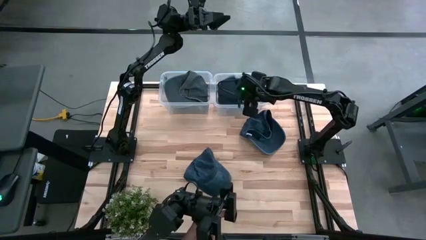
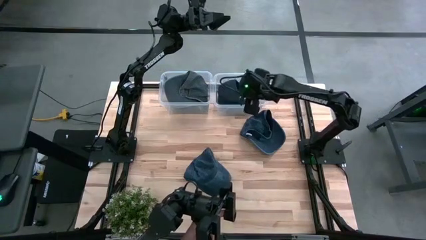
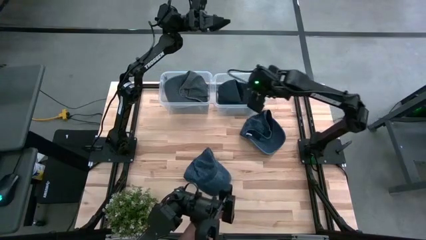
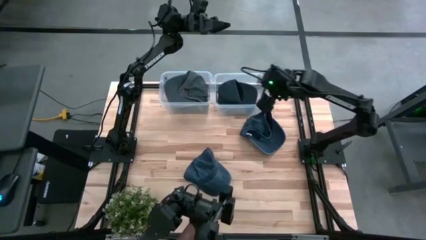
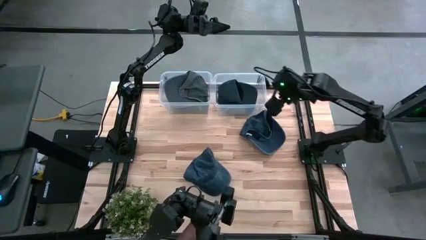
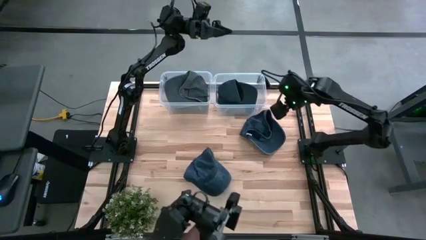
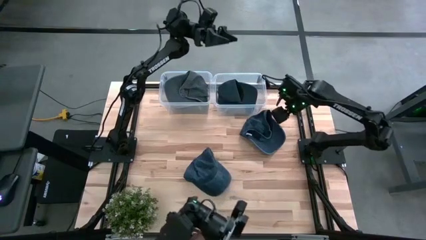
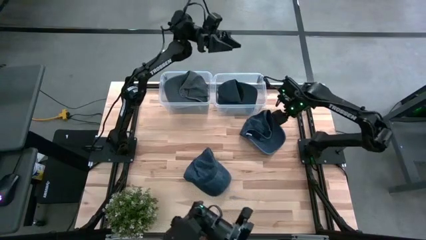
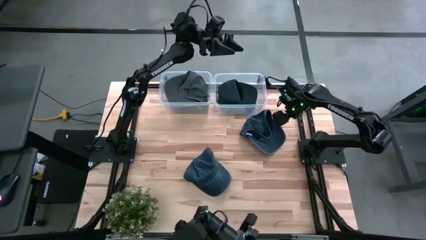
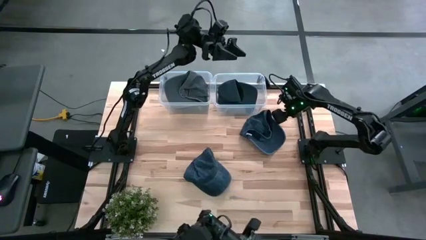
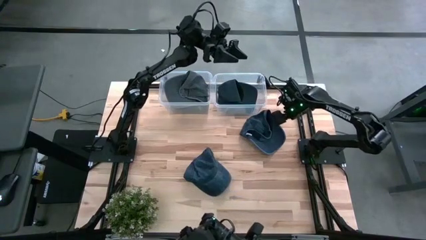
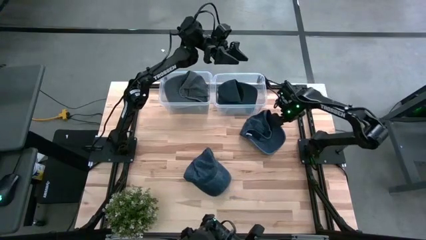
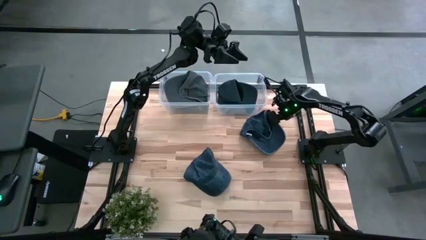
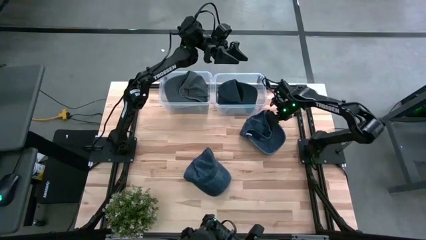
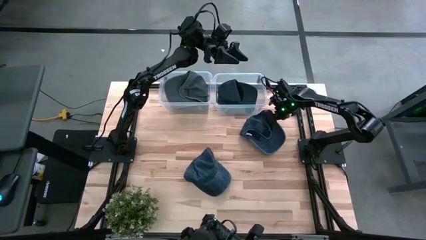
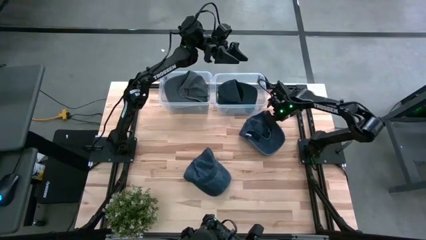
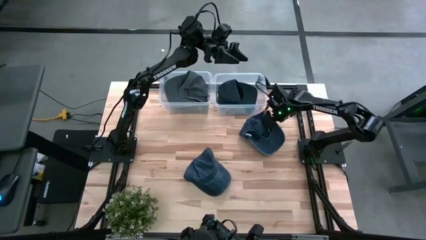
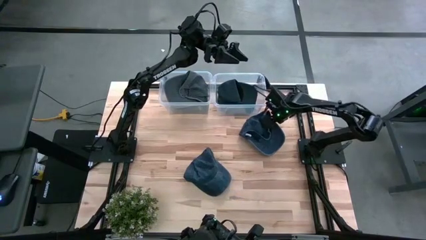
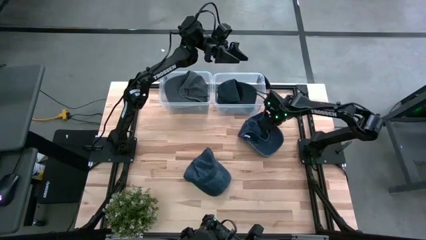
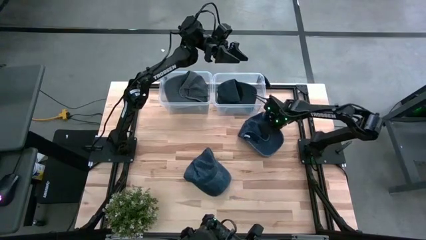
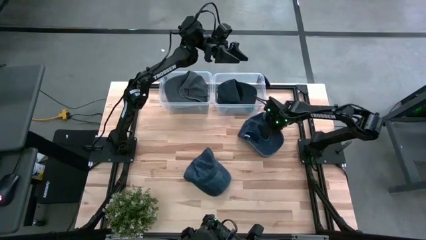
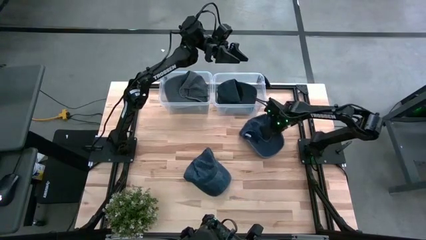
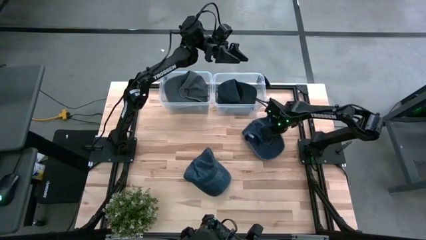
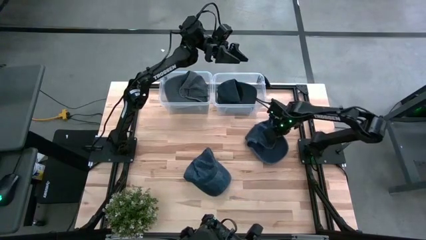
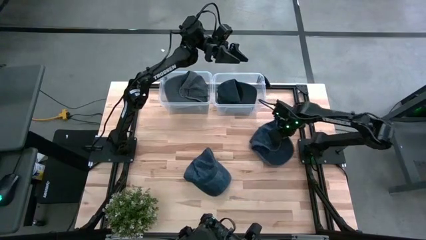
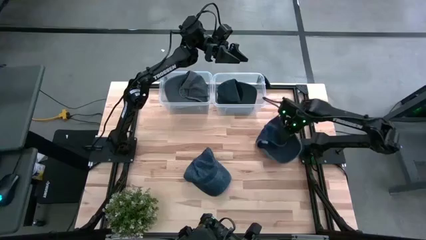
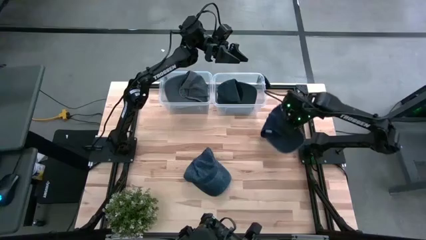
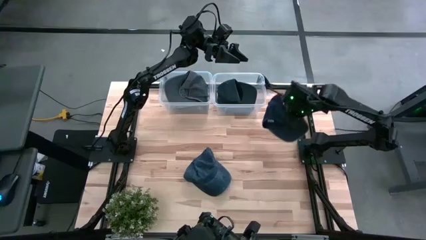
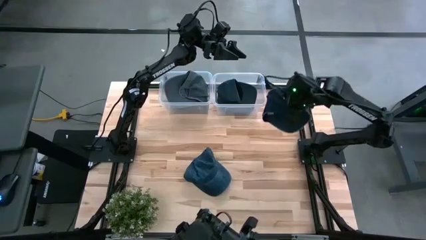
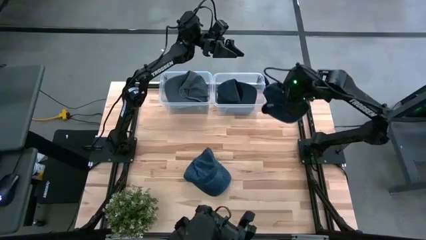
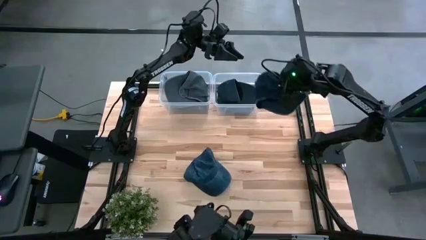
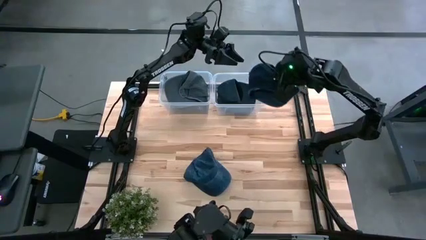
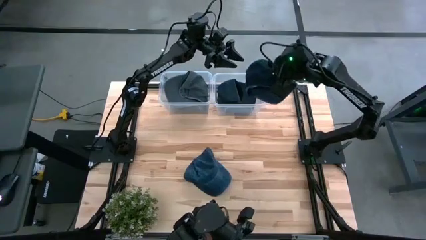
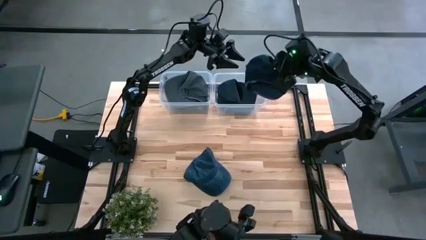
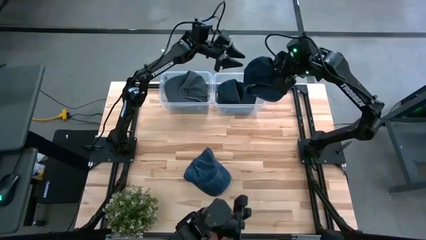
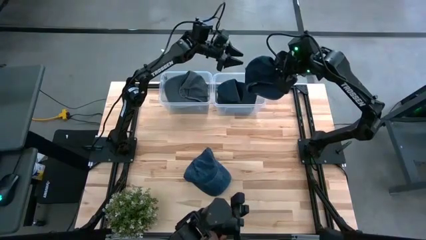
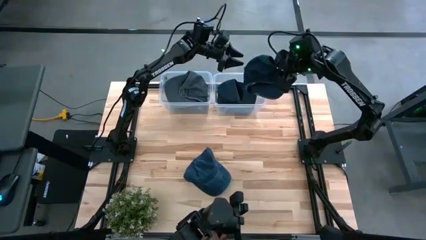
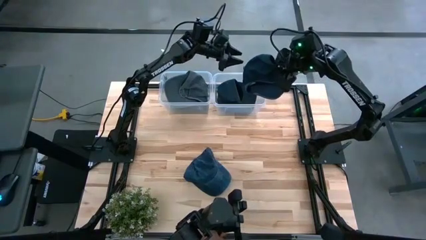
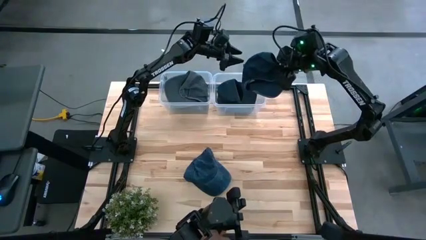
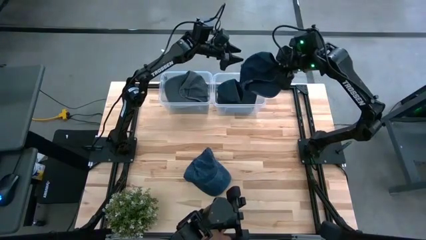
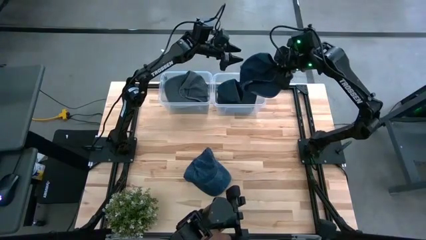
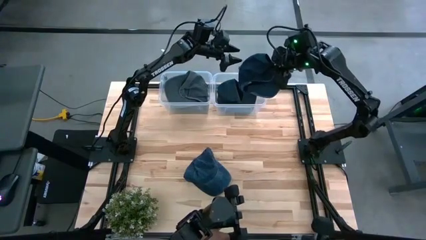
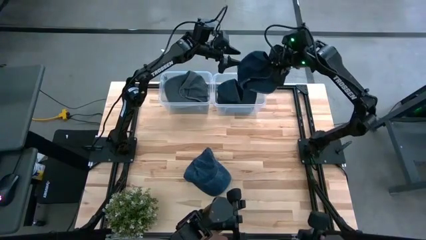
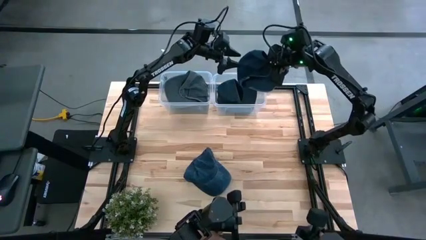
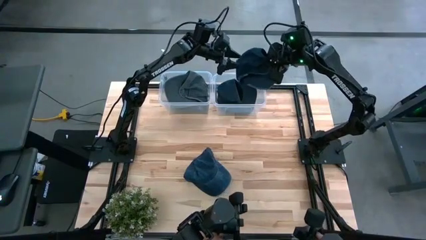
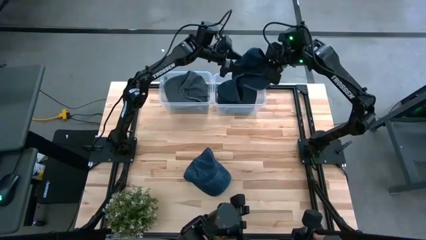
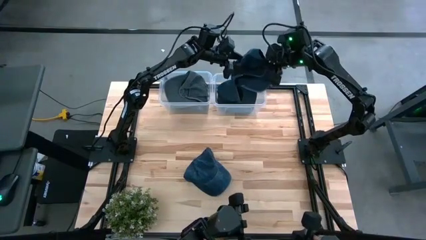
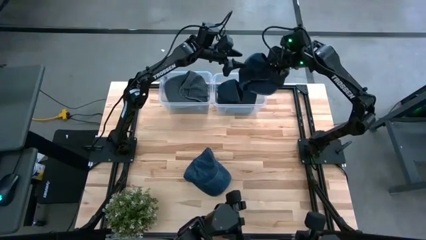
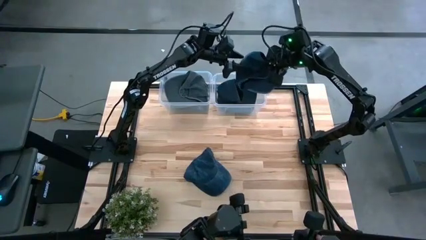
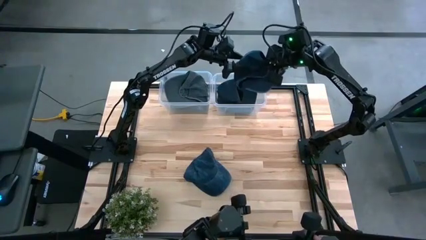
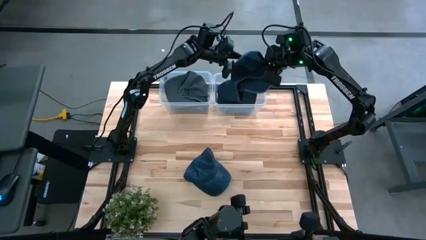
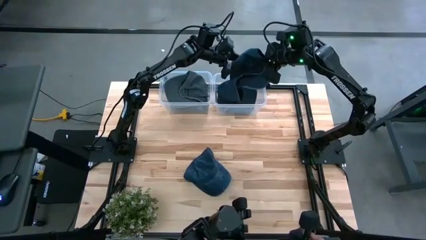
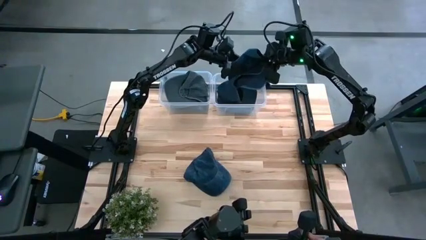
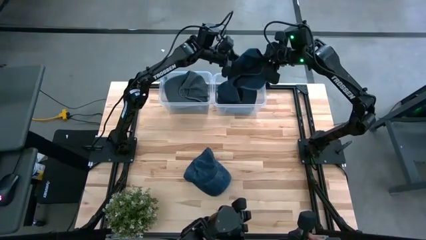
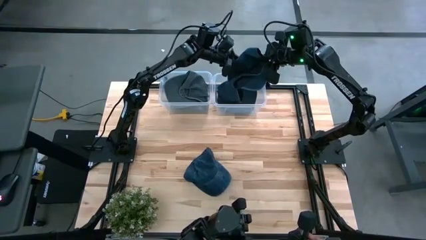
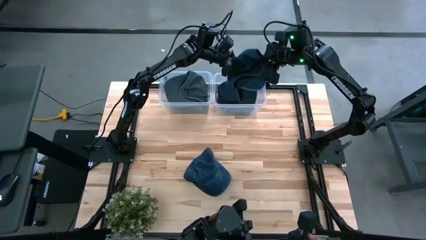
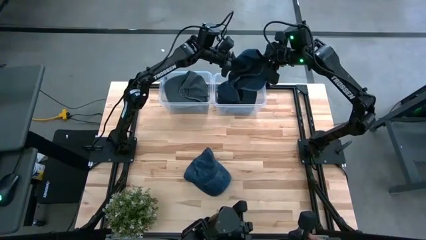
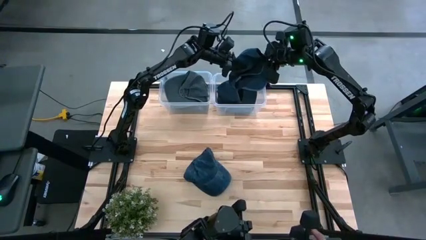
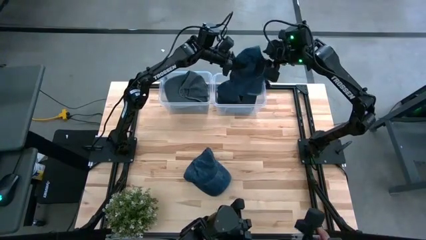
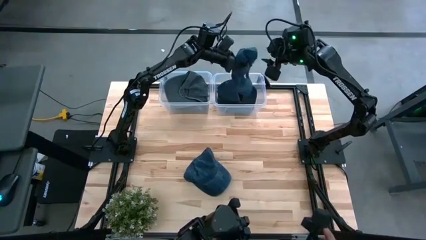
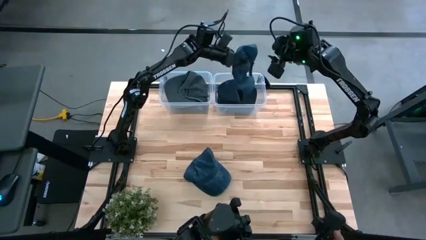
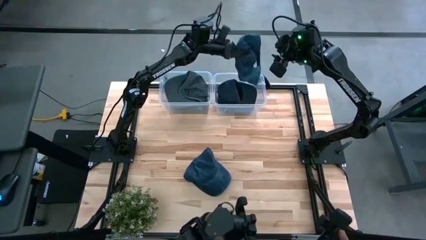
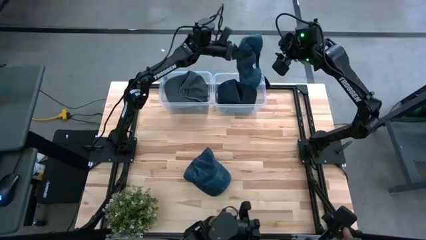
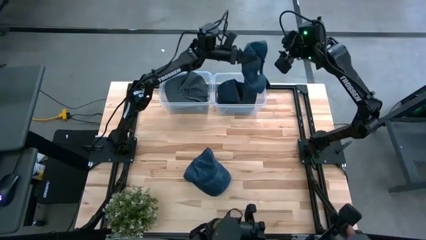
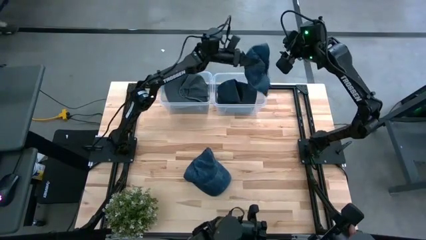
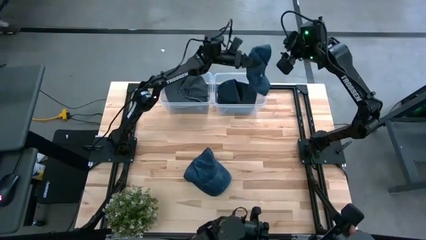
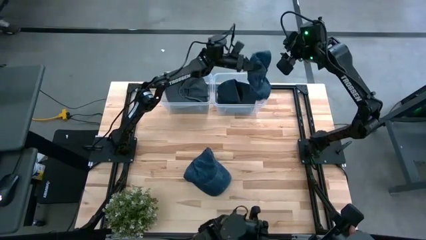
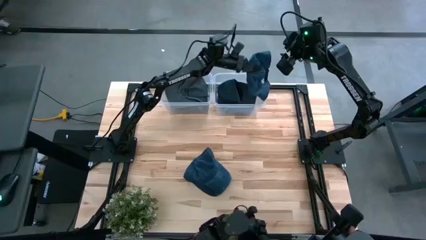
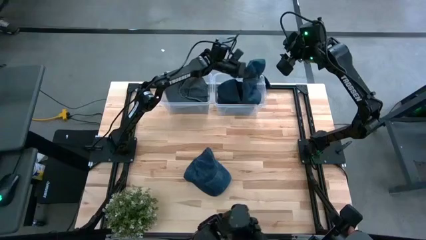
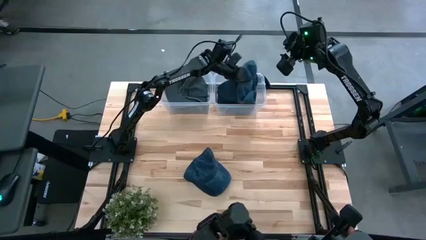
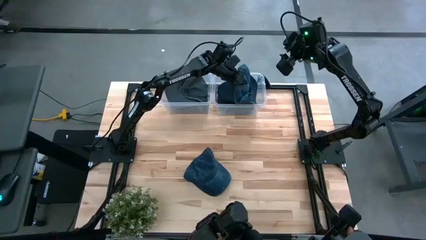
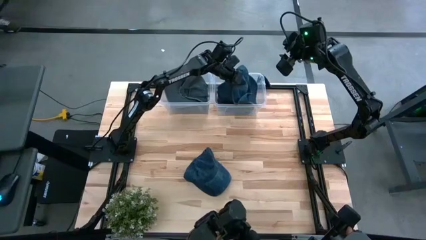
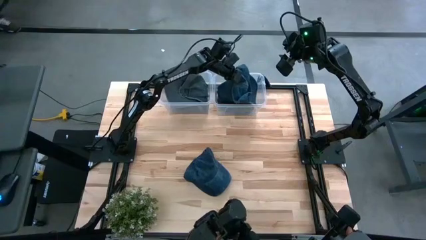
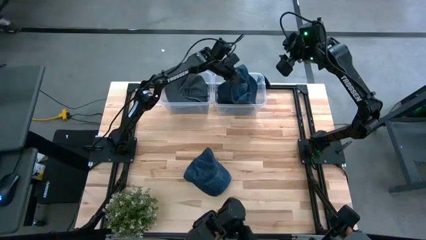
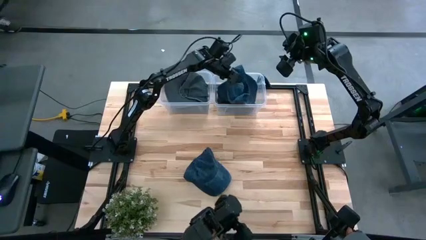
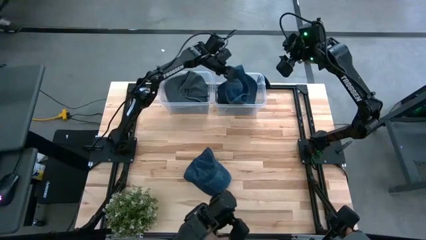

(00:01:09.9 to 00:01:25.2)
Task: Pick & Place hat
Put the top blue cap into the right transparent bin

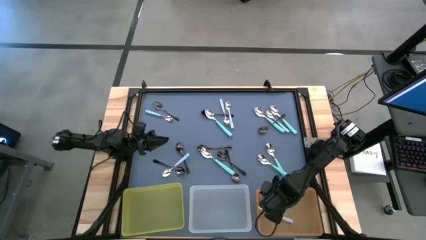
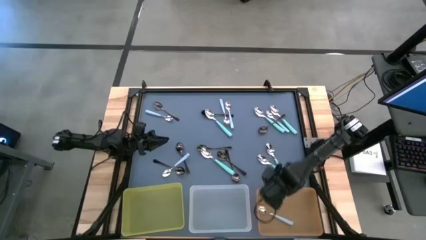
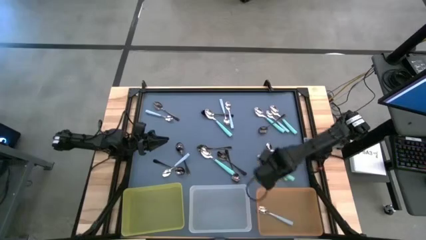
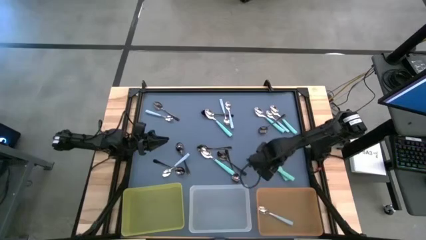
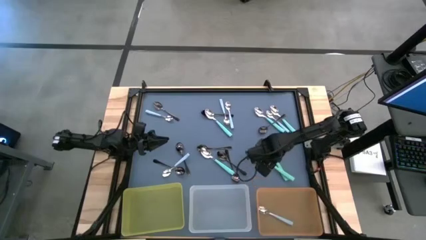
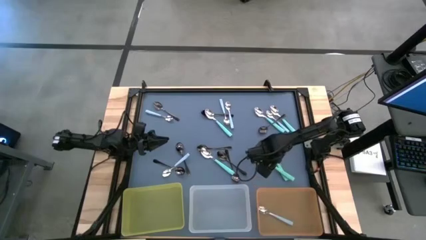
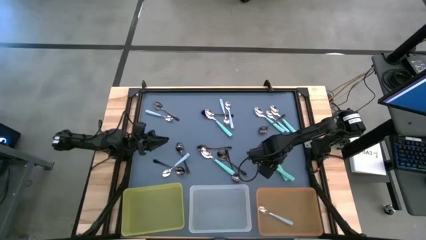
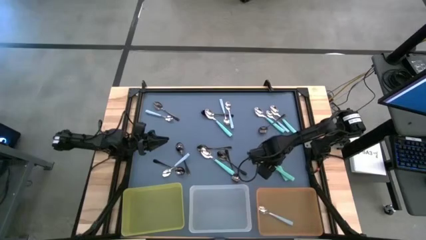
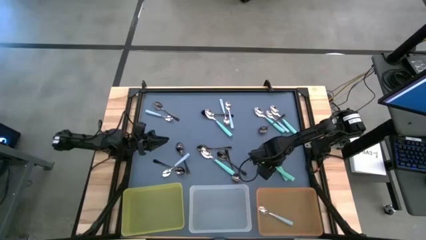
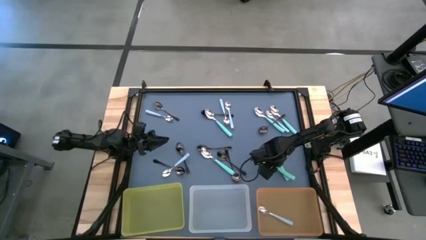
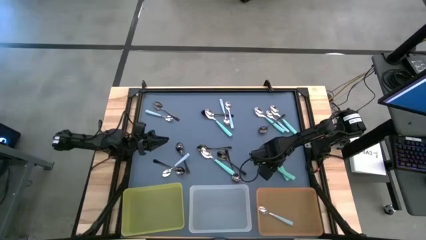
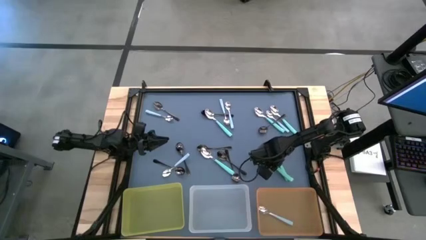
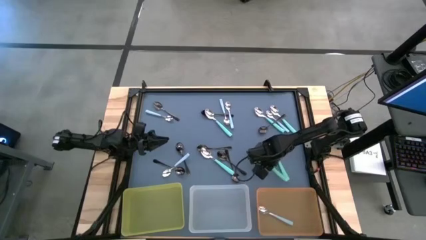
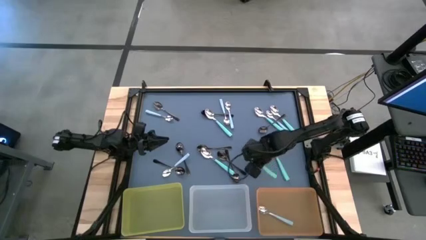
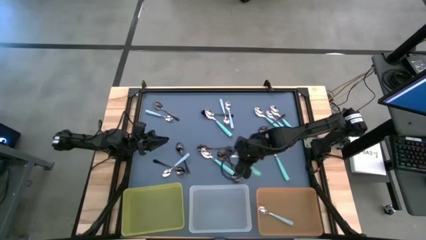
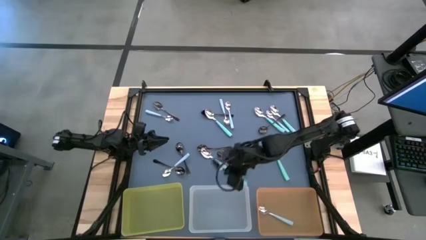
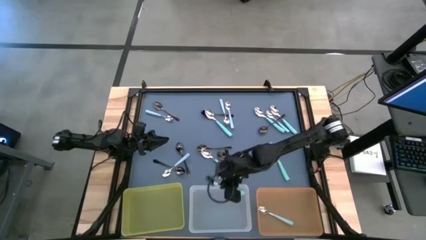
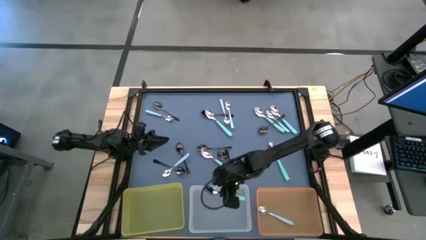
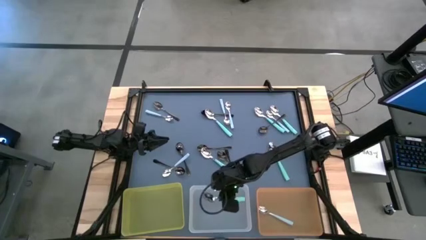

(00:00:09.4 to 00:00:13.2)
Task: Sort silverware by color (type)
Put the green spoon into the transparent bin
